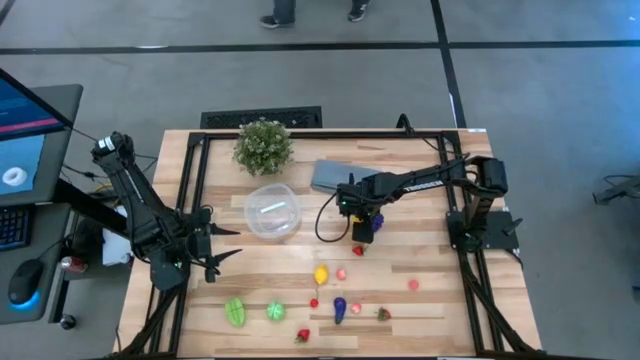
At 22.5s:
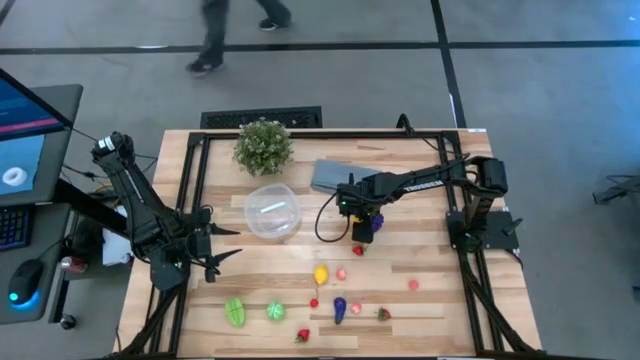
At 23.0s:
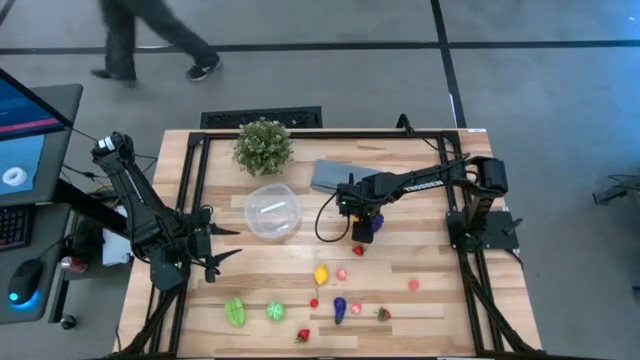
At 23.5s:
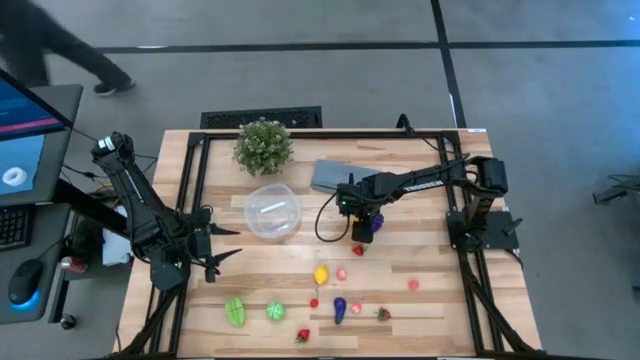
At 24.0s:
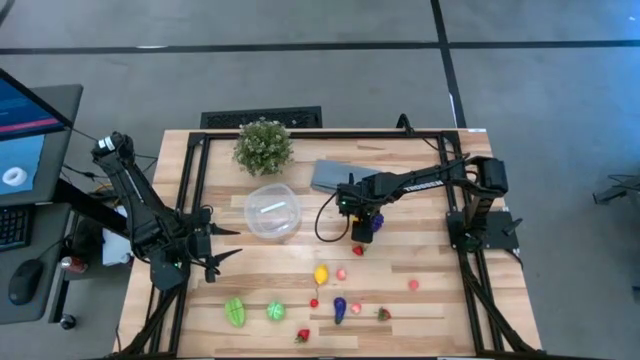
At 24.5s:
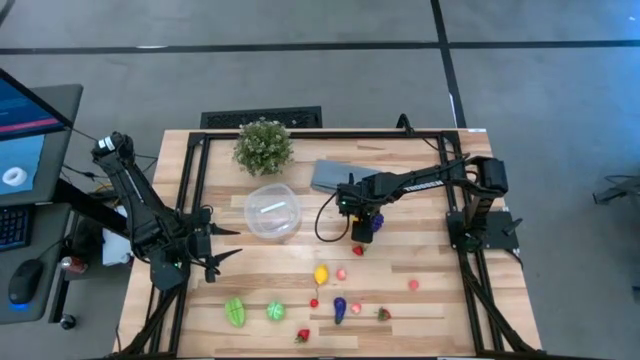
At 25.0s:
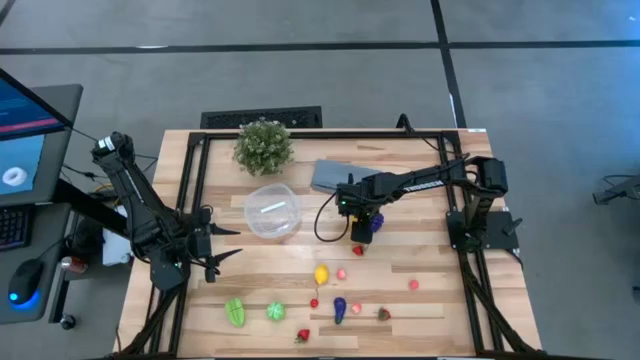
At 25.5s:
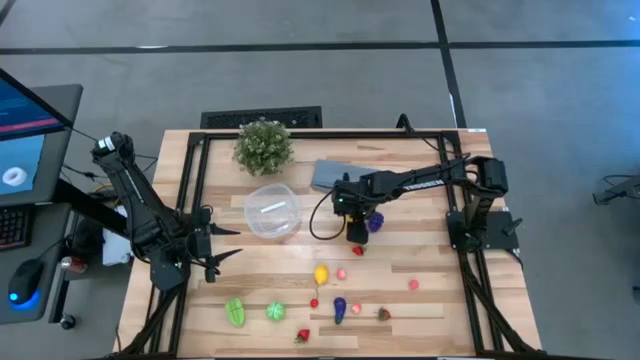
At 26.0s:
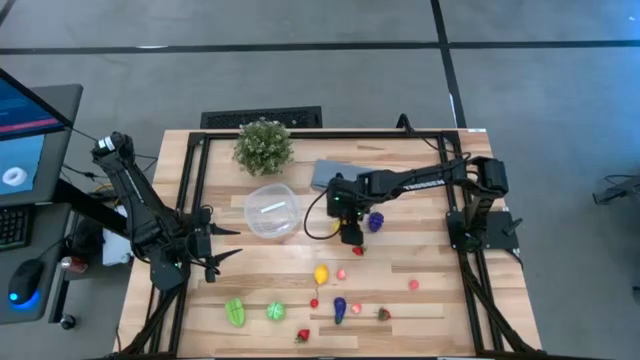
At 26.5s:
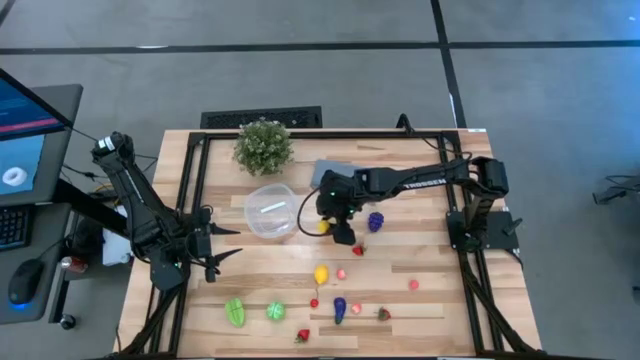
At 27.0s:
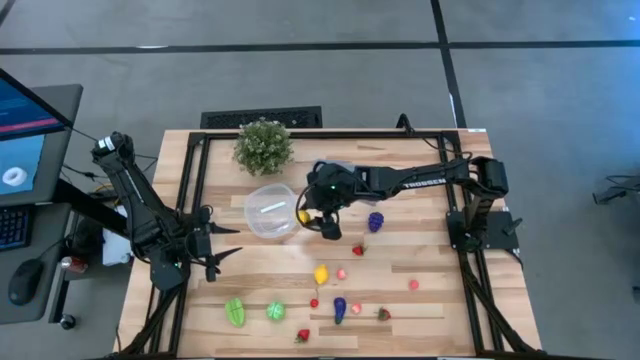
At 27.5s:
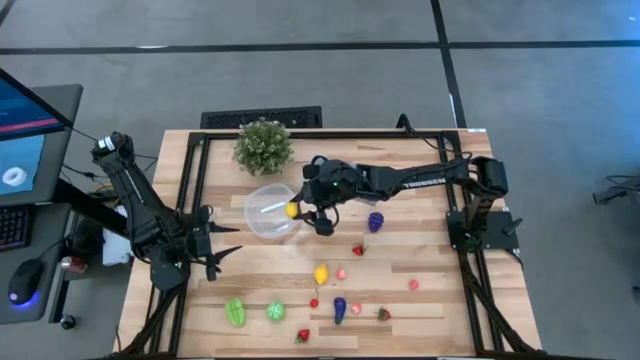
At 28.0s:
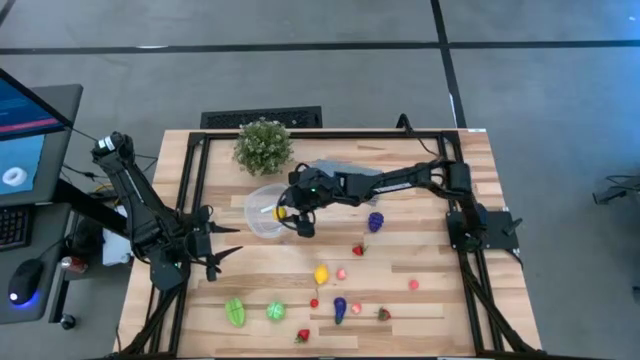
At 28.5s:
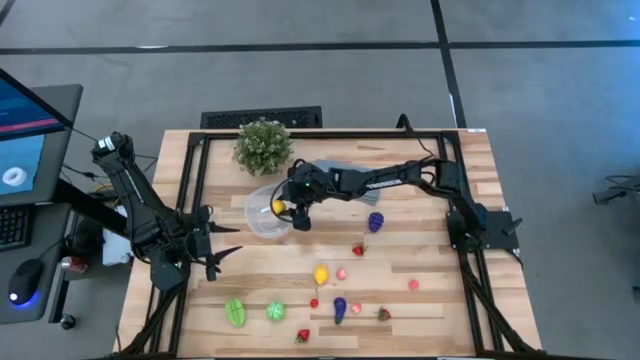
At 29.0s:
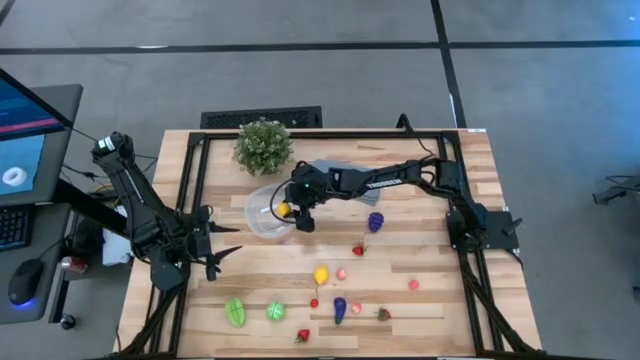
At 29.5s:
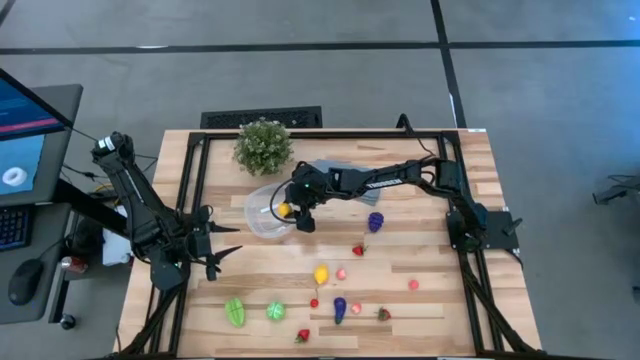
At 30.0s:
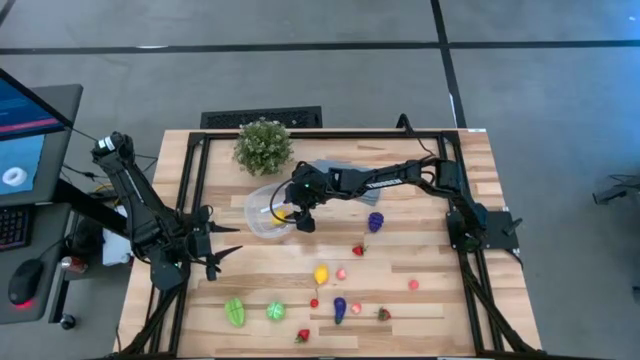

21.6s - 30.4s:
Task: Pick and placing Produce into tupperware
Put the left lemon into the transparent bin

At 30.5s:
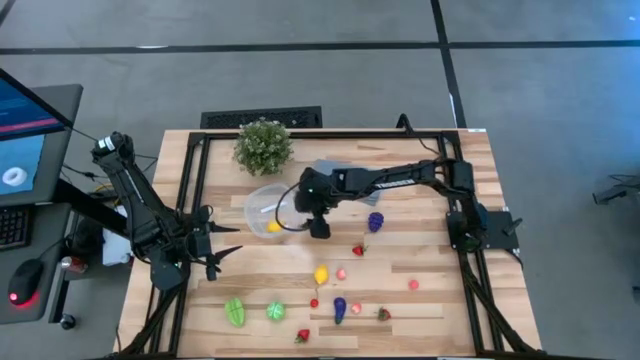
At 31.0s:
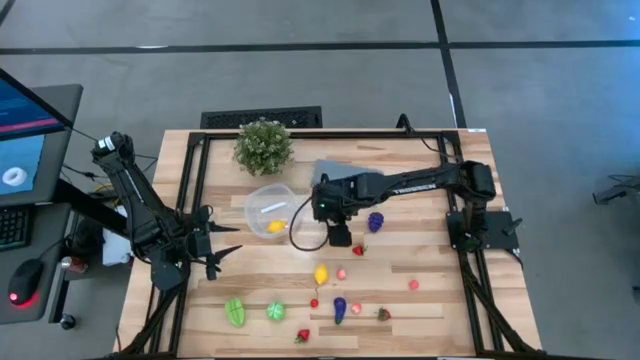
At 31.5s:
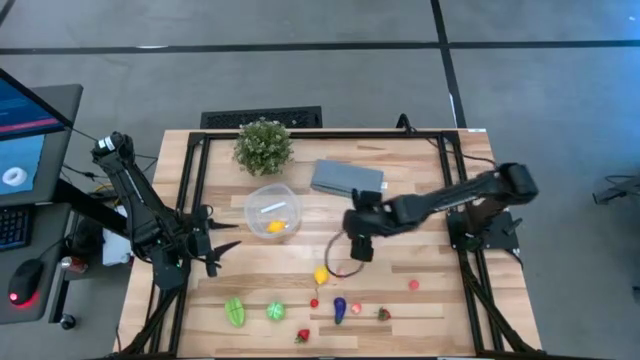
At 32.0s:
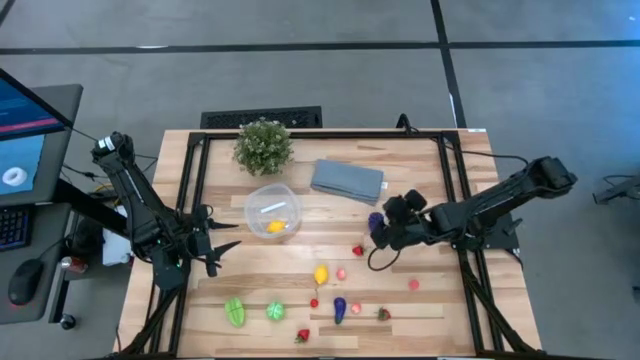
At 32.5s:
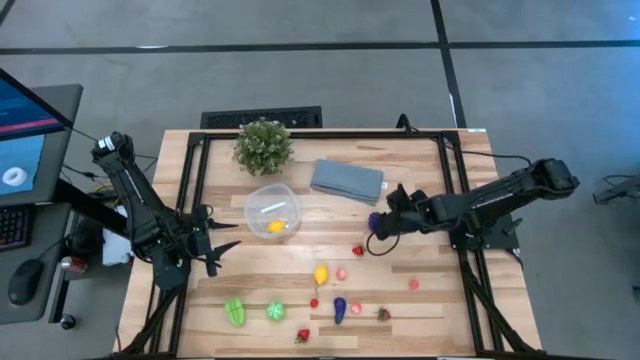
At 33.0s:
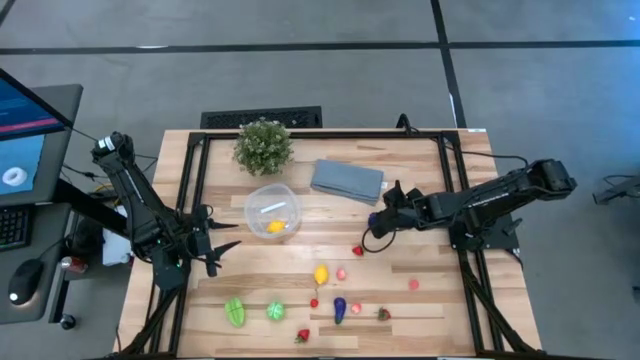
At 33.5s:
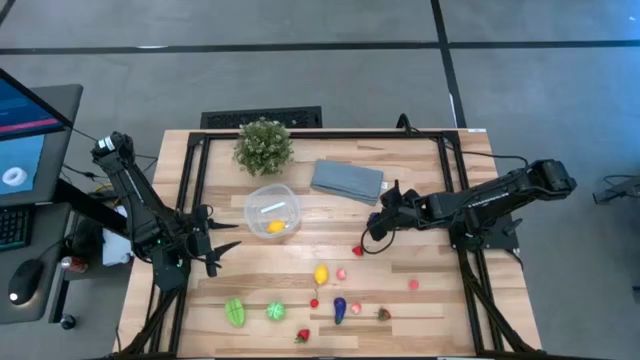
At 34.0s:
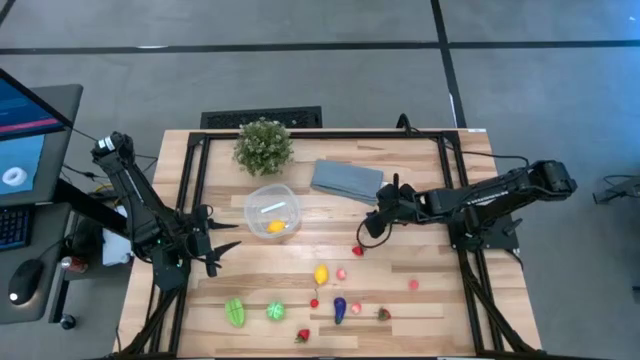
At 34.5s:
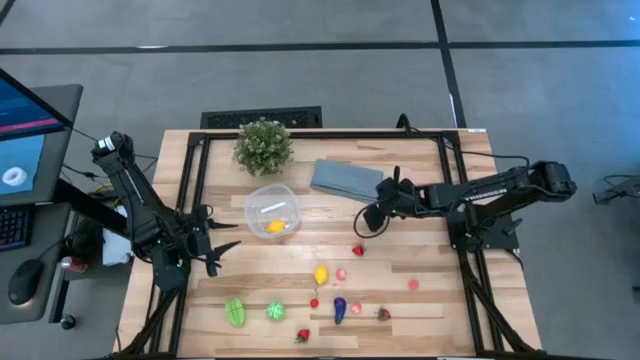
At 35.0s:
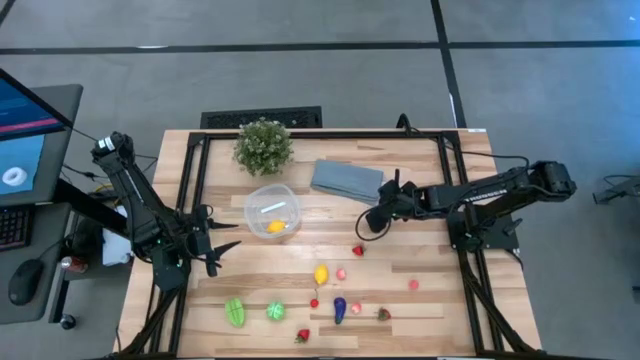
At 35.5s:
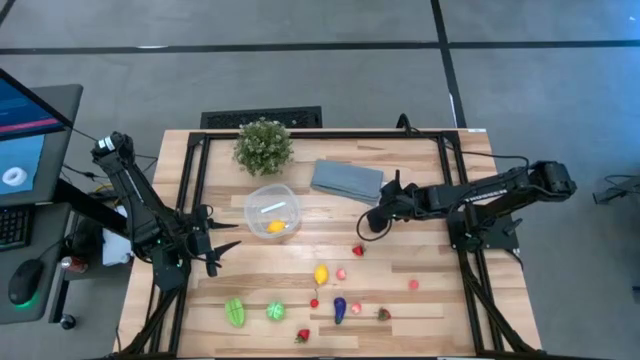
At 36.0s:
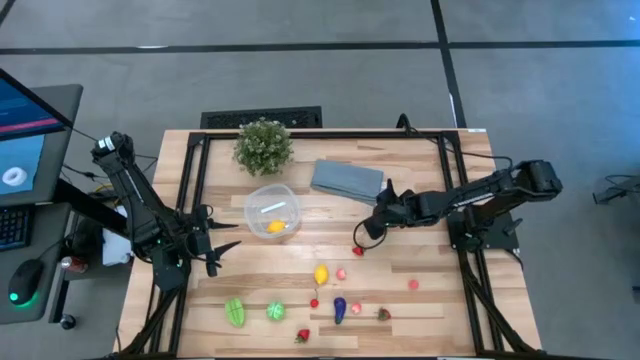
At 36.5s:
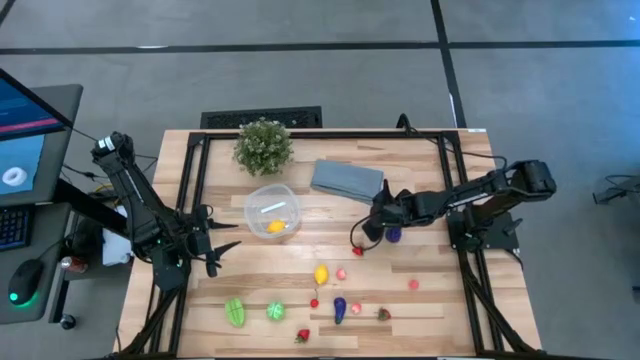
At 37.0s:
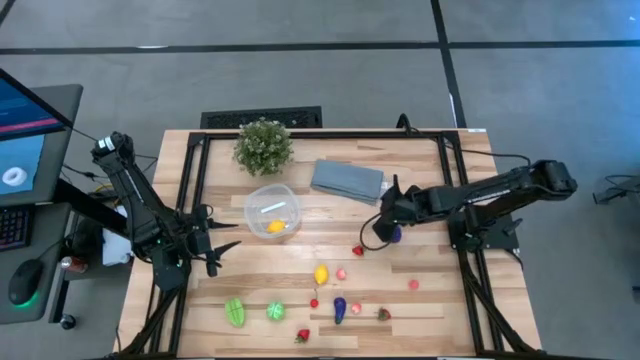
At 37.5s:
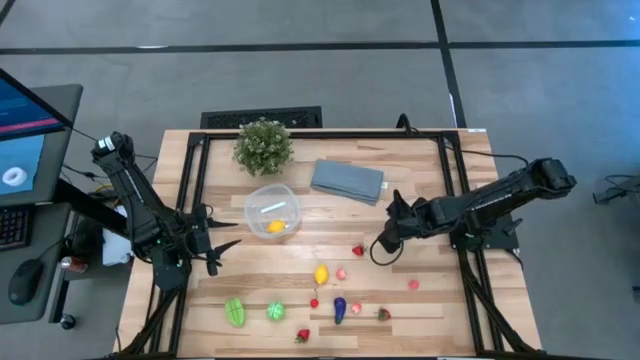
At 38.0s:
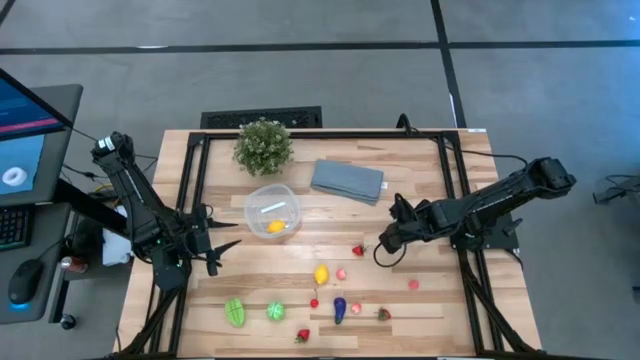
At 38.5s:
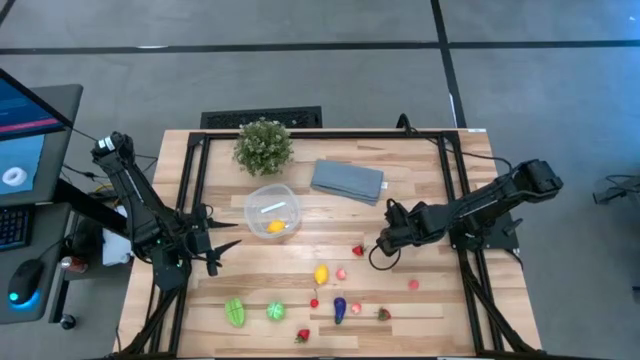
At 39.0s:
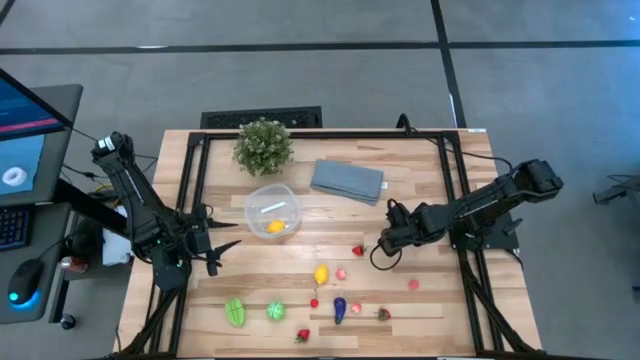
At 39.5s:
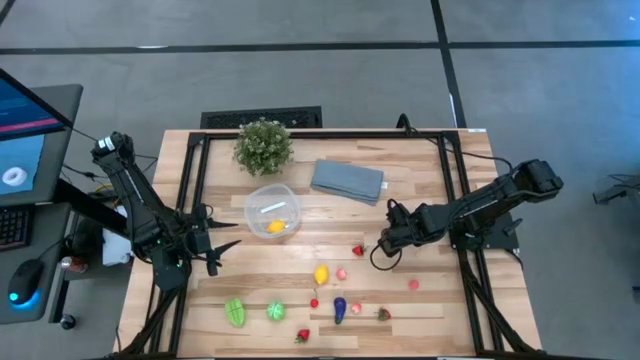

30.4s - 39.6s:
Put the blackberry into the transparent bin

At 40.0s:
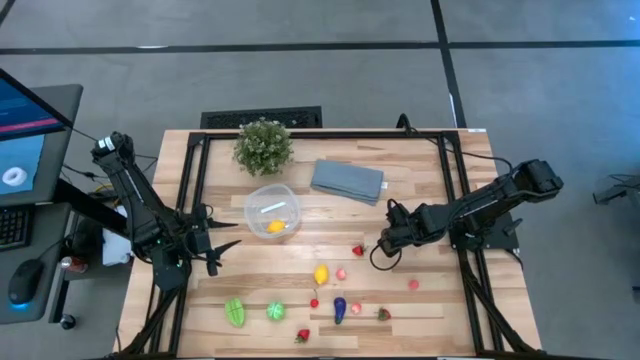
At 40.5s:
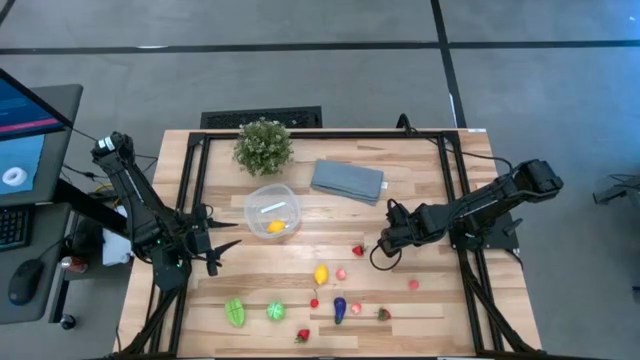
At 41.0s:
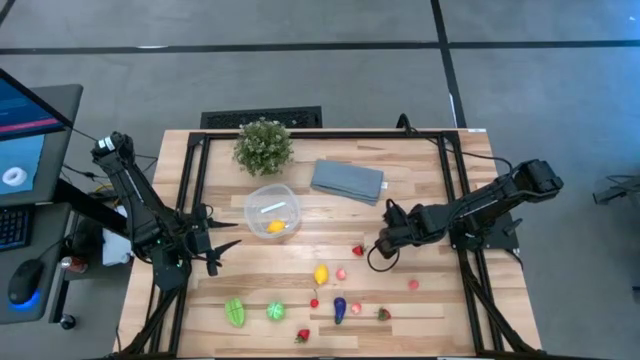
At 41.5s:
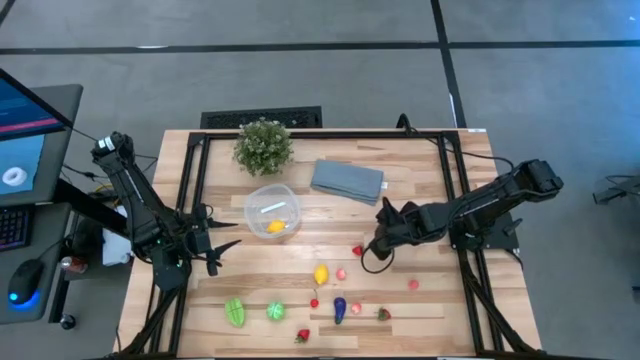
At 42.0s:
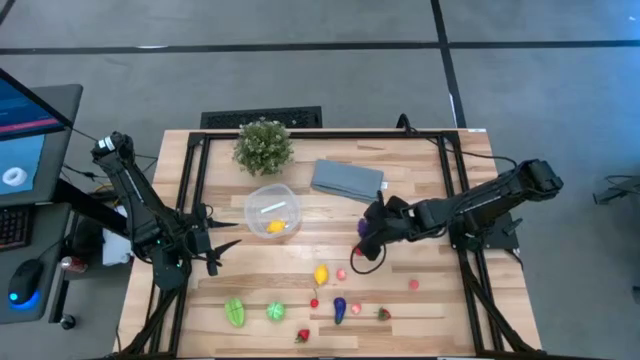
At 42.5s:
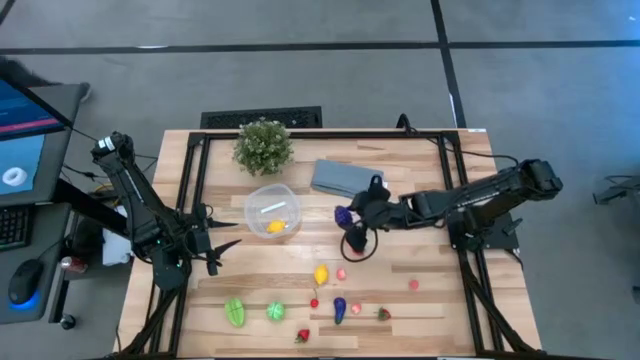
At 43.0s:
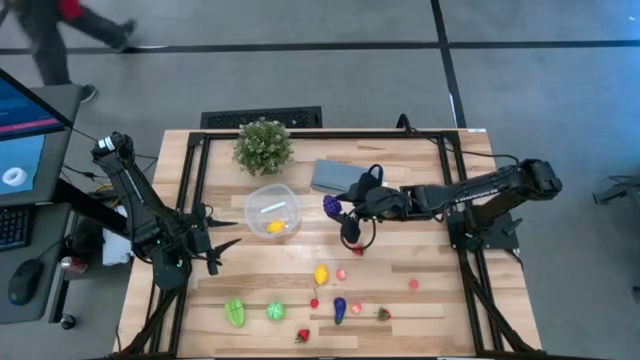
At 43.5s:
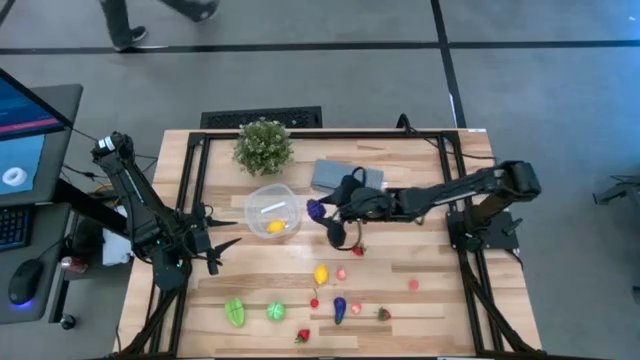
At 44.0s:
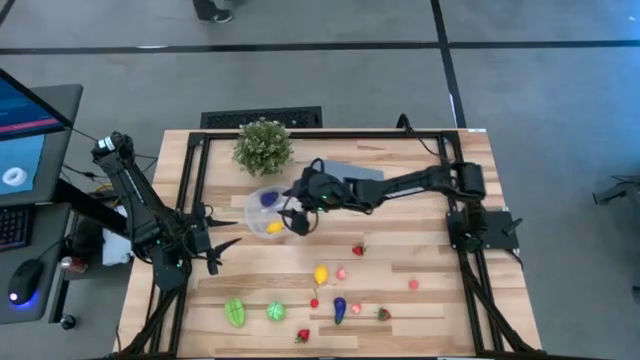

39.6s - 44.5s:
Put the blackberry into the transparent bin

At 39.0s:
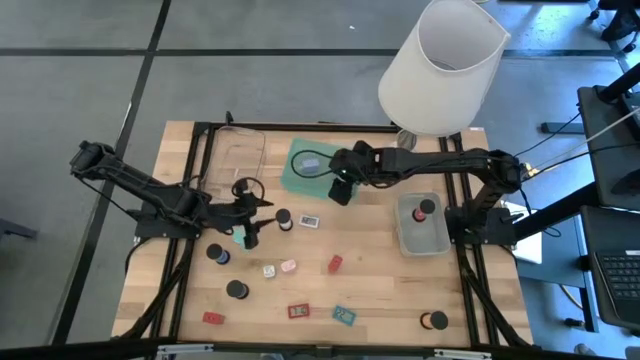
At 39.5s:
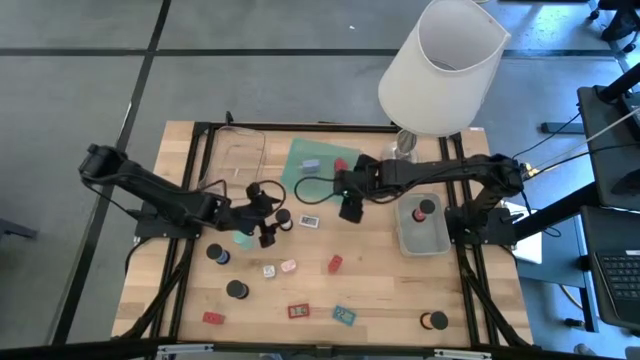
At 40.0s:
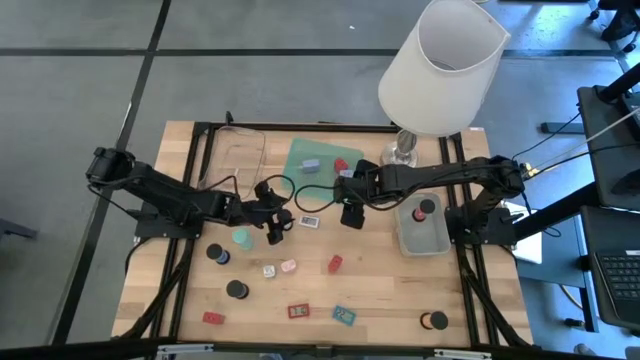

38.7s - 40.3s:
Task: Pick & Place Office items
Put the white hourglass into the gray bin
